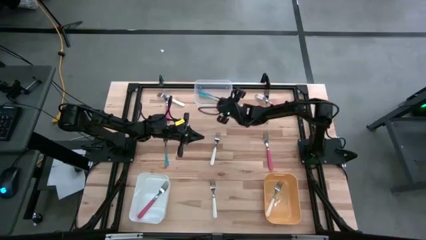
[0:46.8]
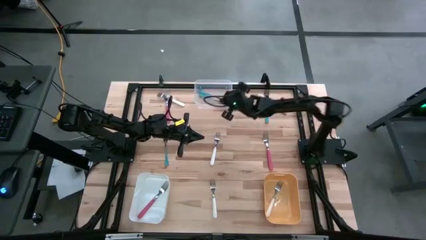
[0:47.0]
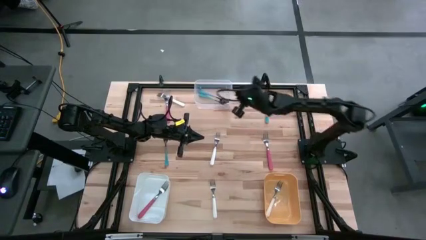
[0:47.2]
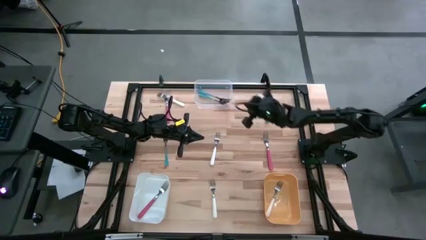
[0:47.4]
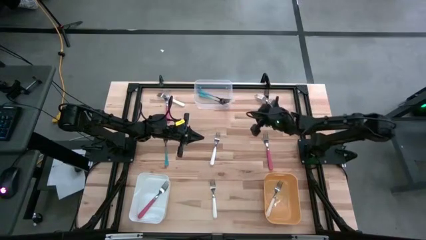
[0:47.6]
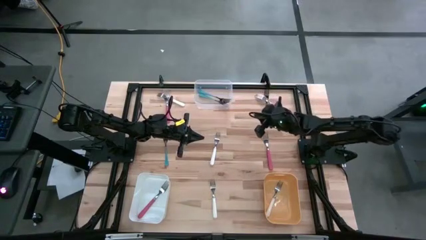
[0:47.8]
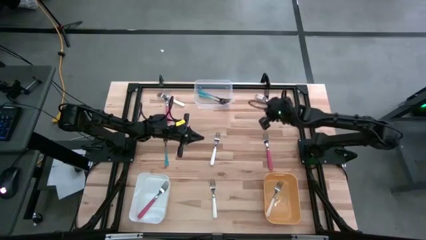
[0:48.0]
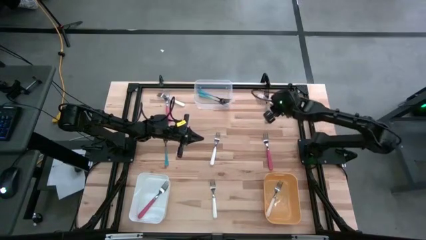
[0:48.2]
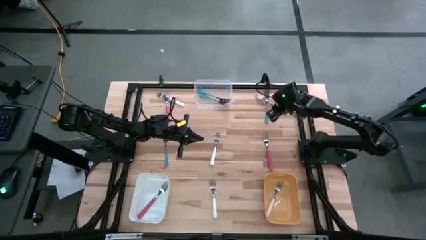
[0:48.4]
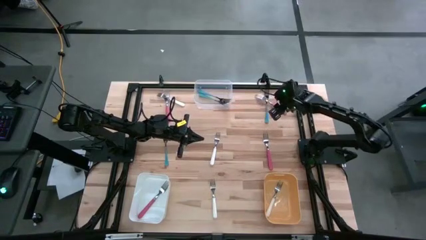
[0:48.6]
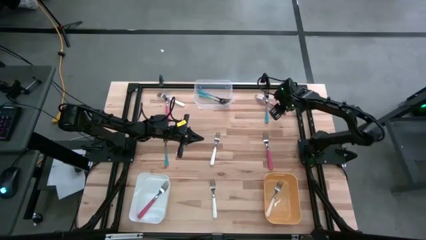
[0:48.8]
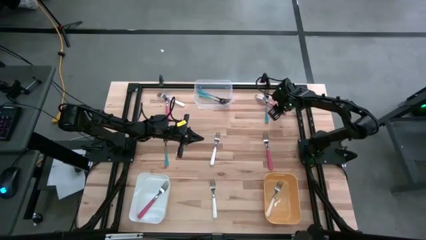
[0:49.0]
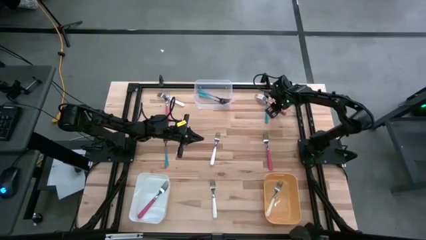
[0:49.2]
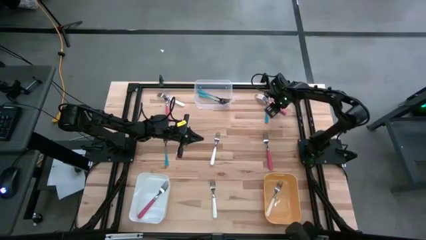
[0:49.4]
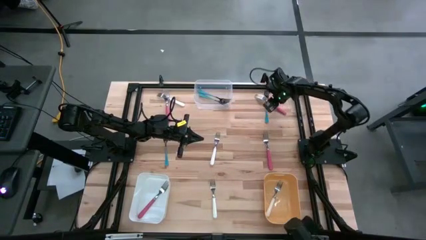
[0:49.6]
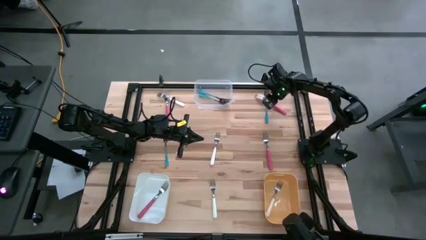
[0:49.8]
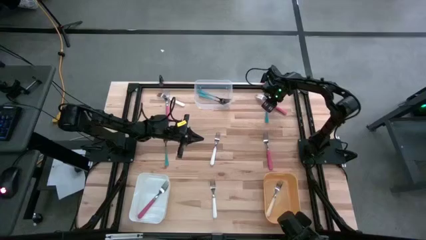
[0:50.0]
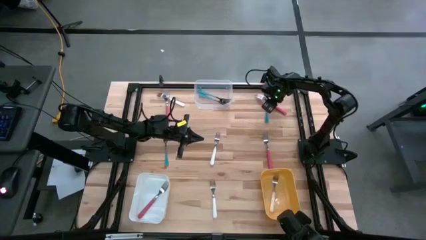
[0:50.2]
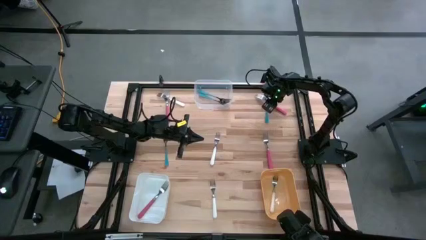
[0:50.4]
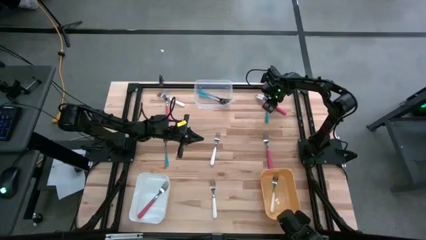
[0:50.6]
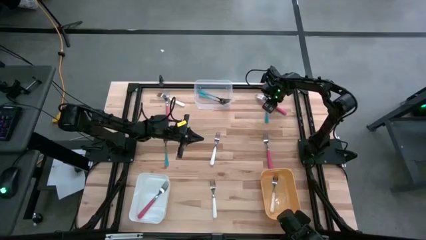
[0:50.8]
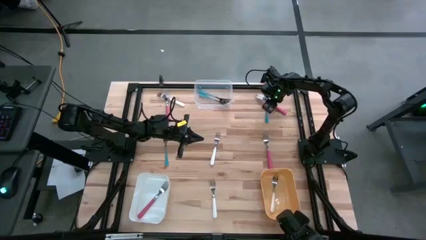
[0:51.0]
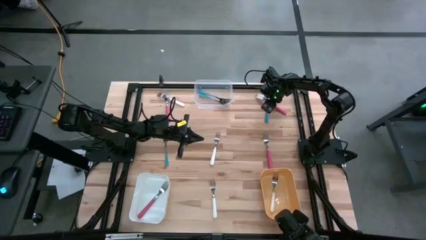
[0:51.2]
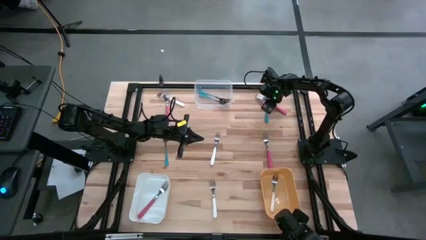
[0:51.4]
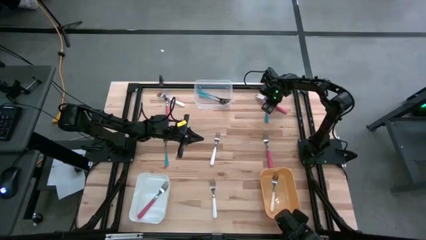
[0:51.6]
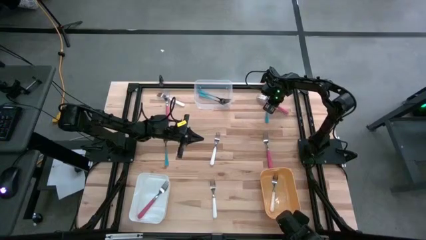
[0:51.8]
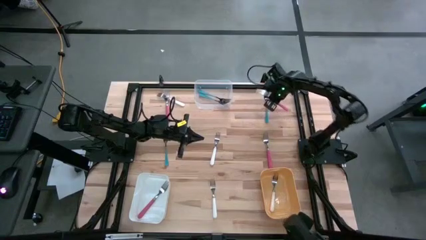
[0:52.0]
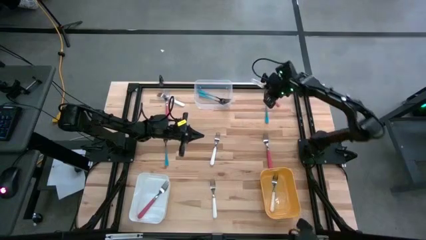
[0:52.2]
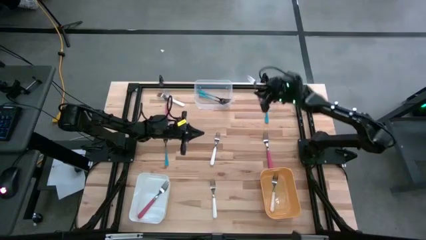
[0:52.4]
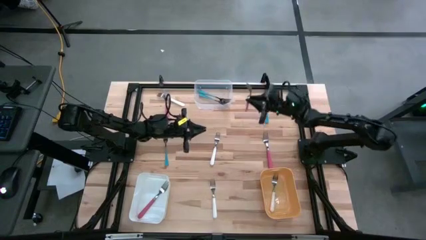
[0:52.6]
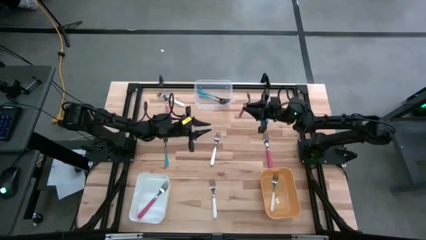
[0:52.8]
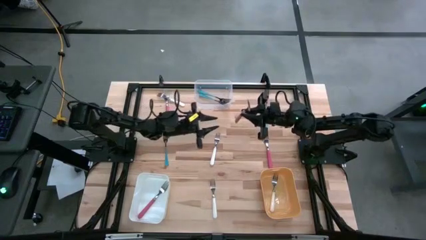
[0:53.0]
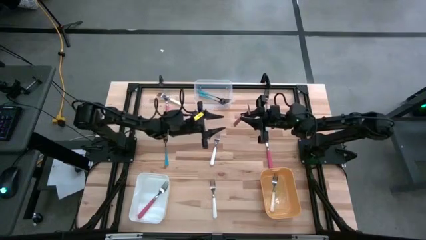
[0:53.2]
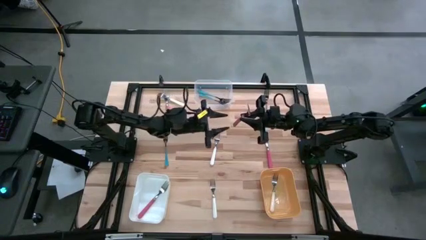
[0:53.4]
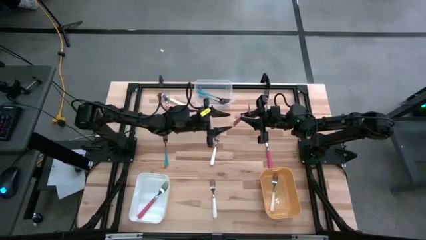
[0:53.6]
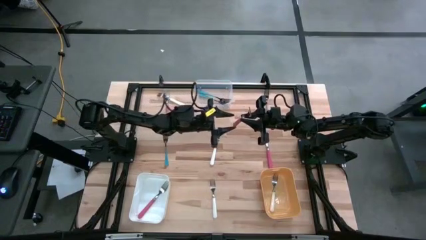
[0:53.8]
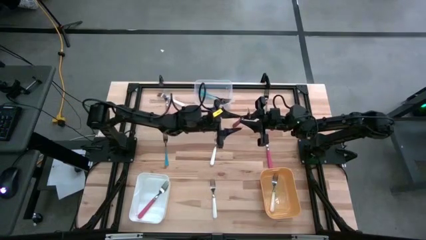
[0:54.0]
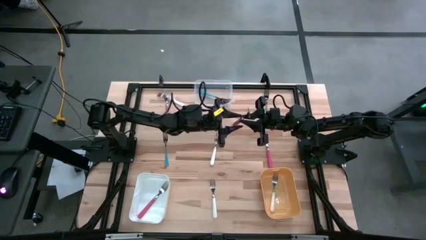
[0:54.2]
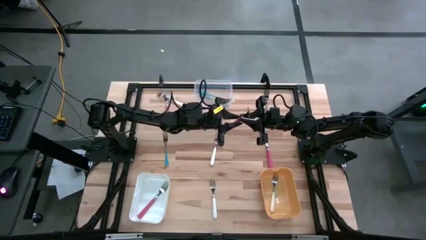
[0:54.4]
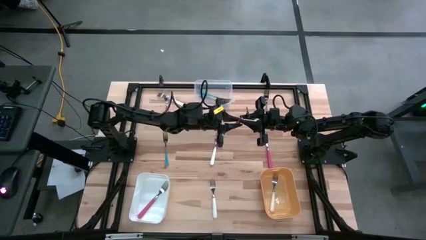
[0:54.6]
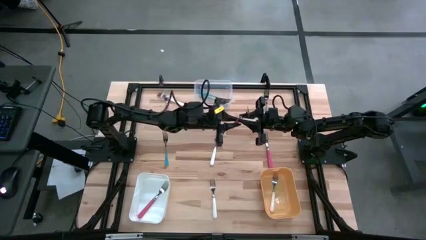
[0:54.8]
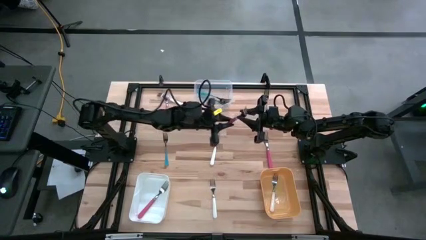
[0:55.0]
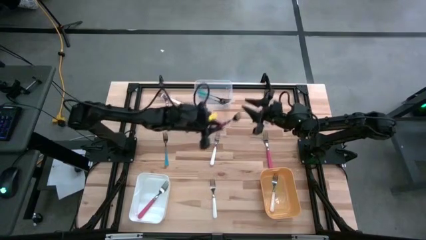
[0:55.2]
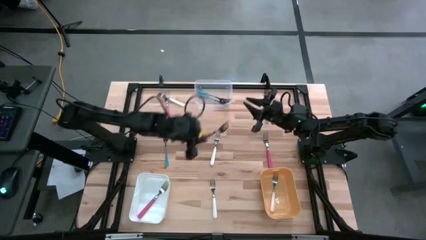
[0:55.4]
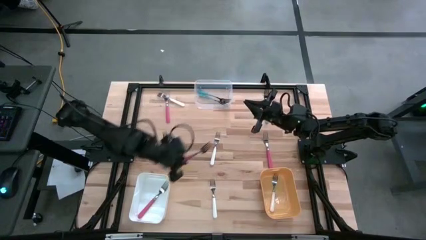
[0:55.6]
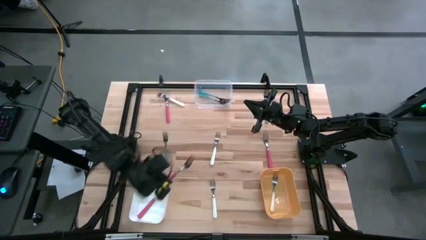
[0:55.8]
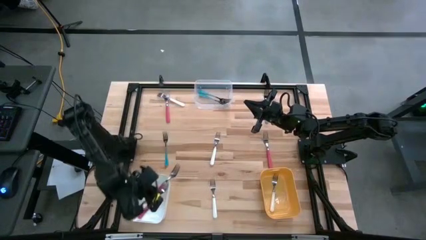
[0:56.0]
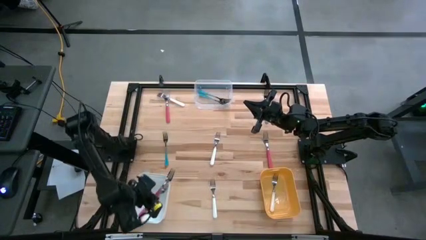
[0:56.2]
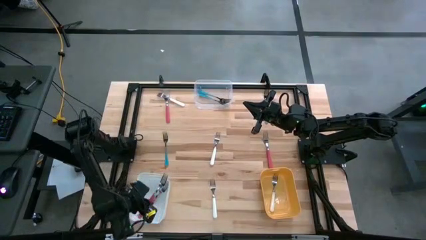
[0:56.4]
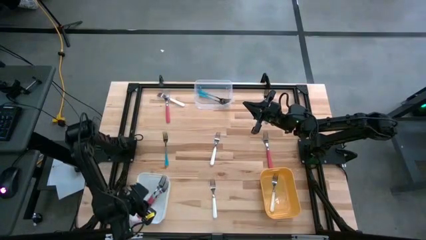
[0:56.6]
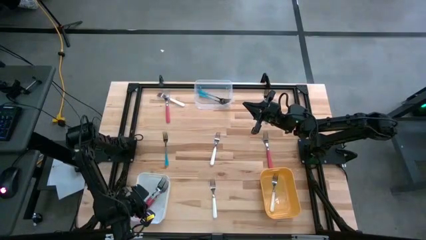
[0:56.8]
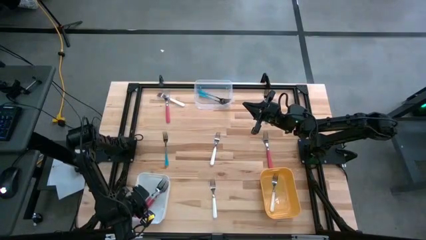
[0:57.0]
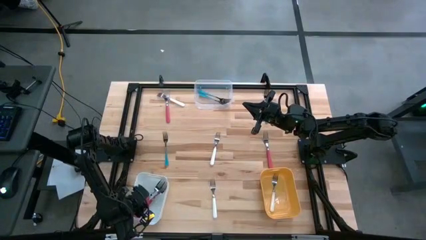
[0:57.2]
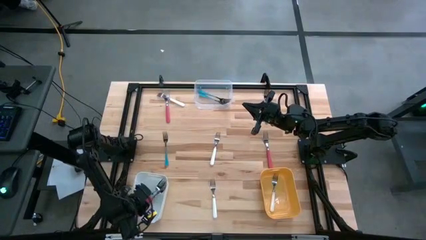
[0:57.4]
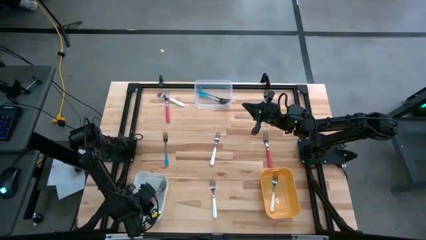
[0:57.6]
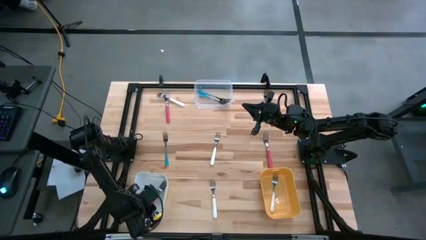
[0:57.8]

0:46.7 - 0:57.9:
Task: Sort silverware by color (type)
Put the red fork into the white bin

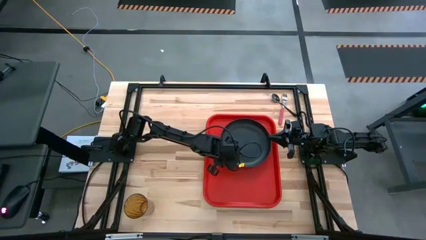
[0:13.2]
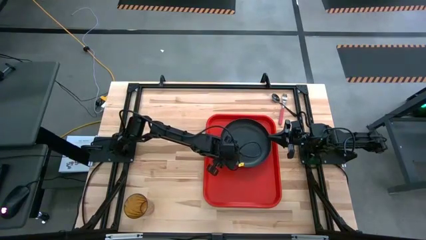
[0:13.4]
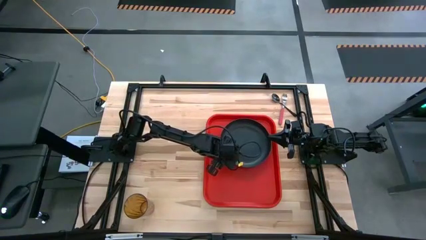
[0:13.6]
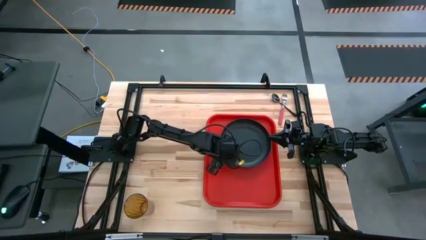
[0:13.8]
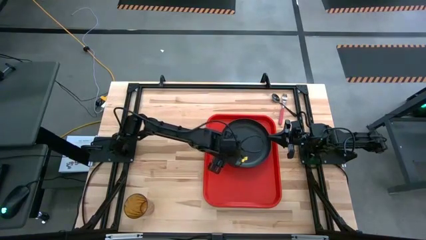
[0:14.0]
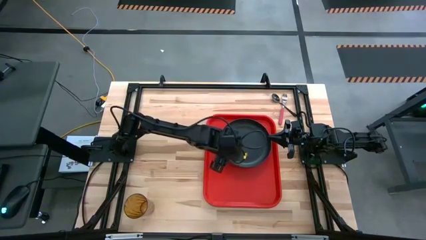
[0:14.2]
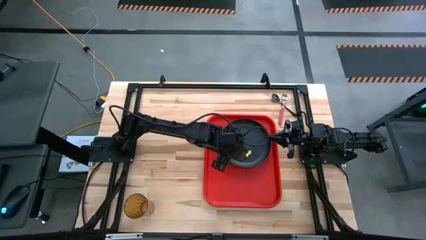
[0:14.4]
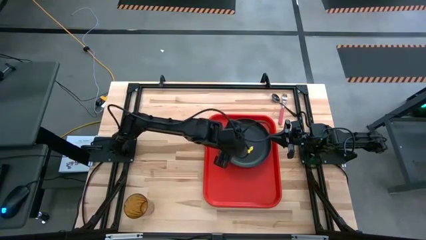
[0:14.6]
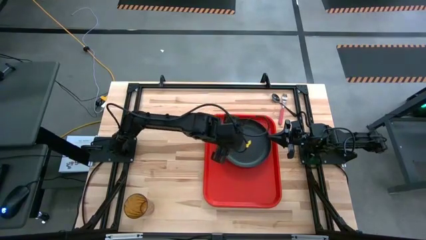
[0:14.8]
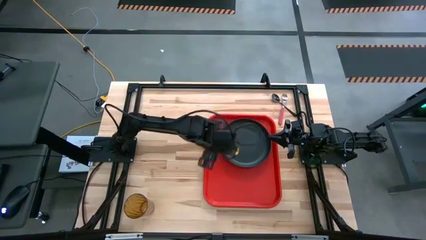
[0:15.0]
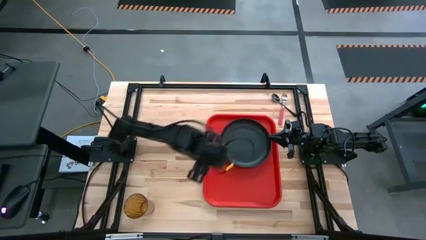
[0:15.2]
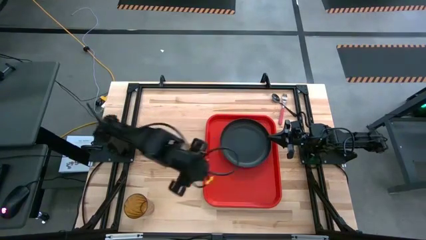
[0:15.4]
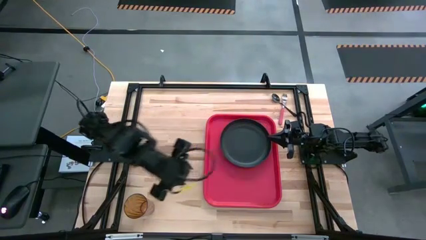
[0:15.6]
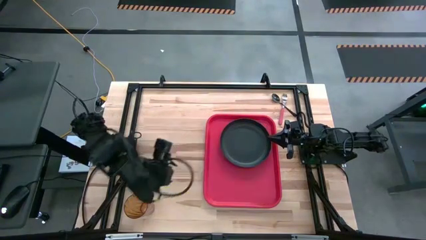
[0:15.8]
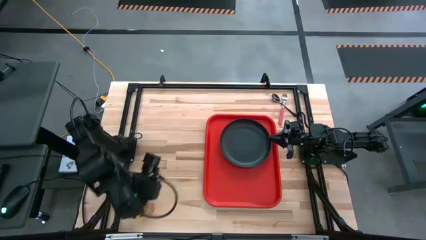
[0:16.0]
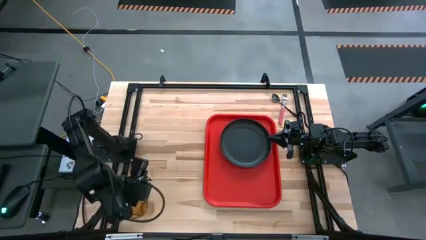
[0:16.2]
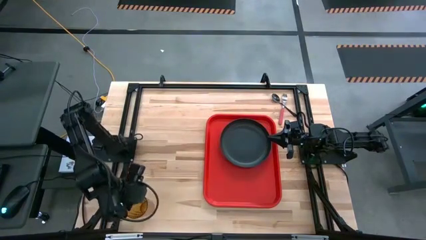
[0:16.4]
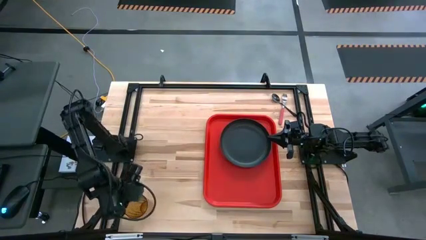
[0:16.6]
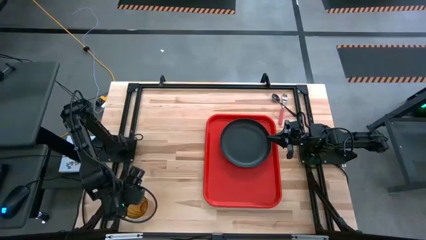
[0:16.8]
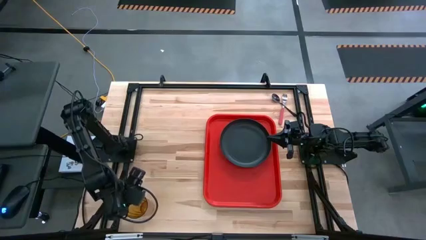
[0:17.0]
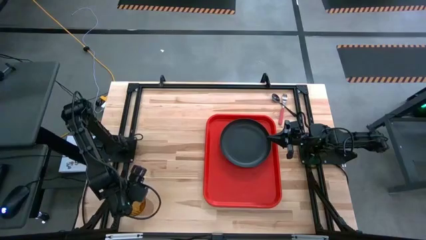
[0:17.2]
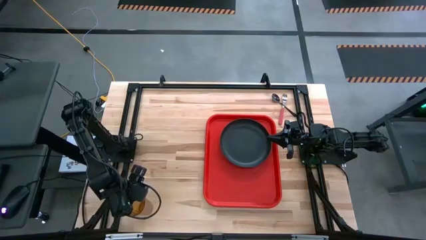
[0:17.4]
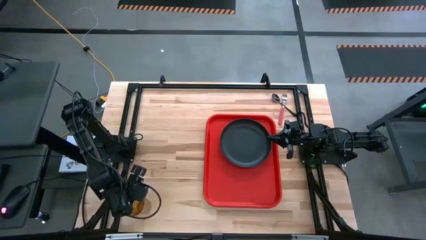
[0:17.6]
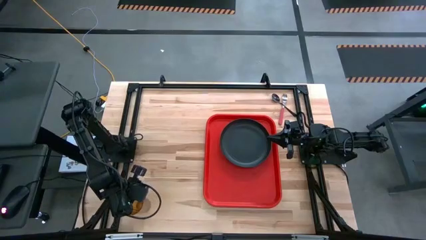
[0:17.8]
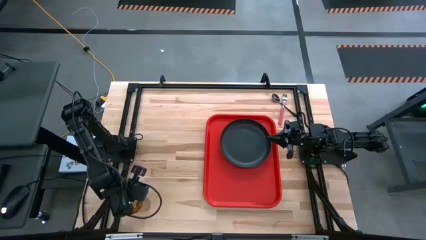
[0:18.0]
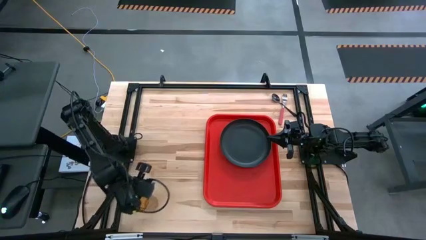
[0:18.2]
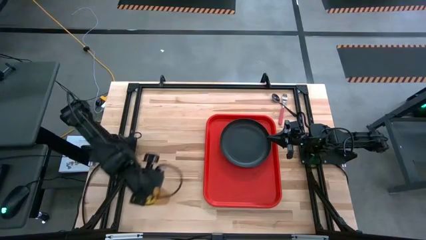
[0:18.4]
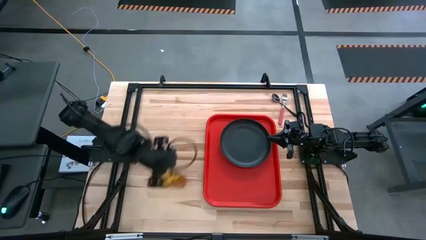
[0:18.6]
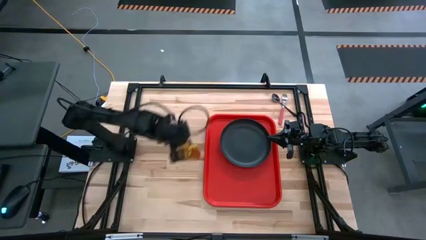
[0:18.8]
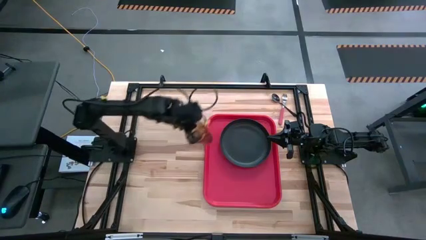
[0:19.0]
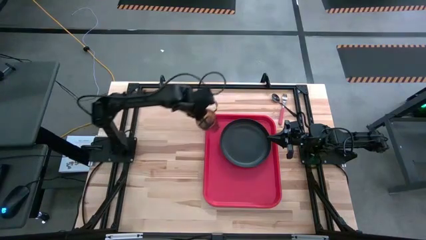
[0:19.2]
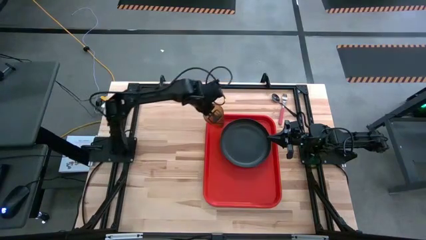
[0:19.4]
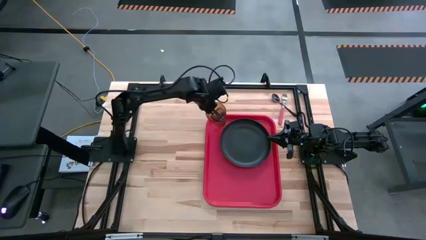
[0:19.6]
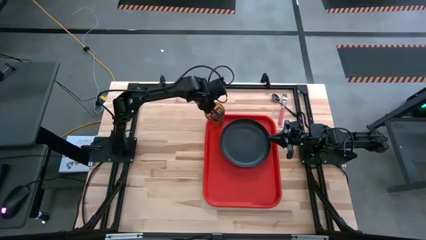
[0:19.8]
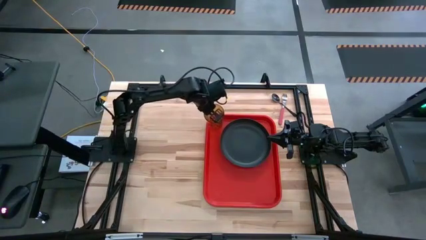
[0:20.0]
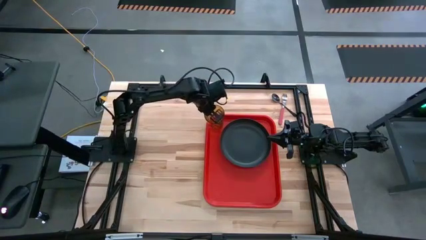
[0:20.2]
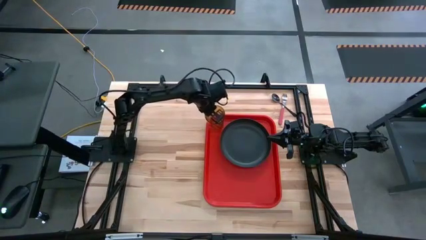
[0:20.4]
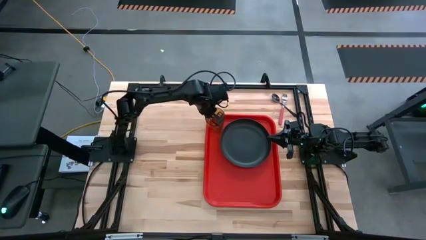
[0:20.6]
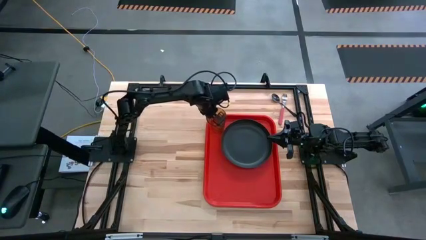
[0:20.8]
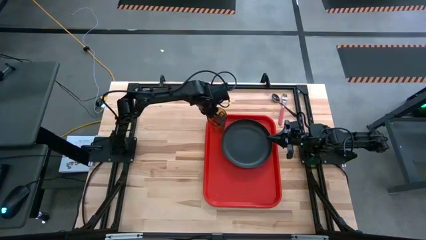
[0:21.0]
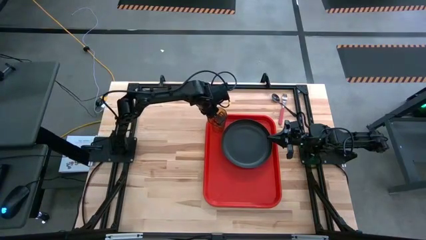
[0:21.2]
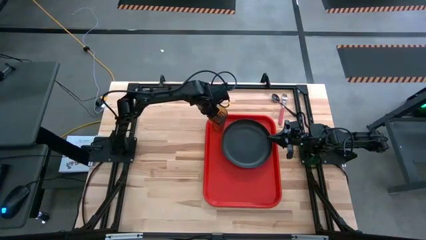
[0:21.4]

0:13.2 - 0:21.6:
Task: Pick and place plate/cup/fork/spoon on tray
Put the brown cup on the red tray to the top left of the black plate
